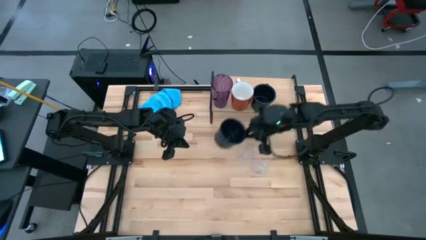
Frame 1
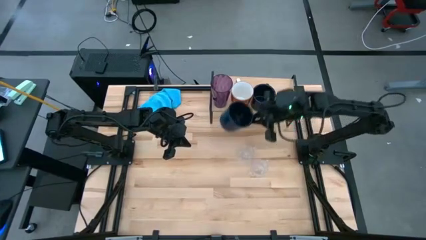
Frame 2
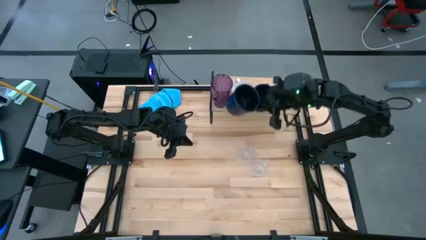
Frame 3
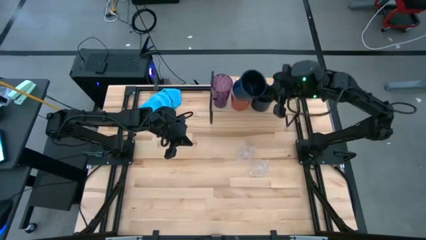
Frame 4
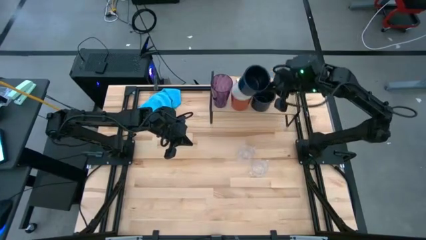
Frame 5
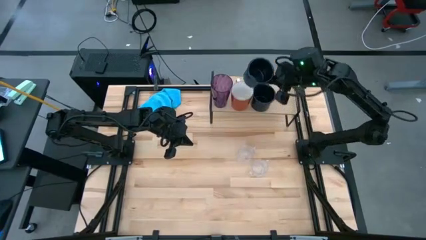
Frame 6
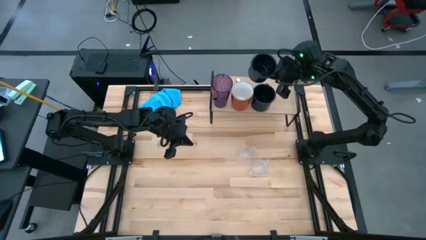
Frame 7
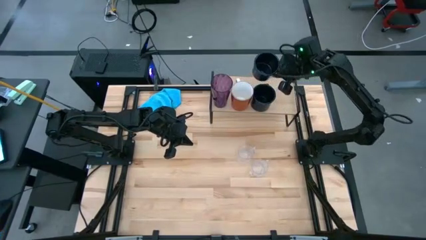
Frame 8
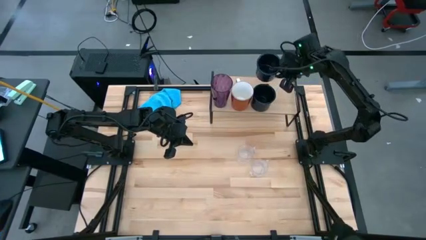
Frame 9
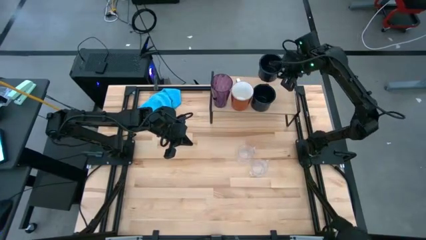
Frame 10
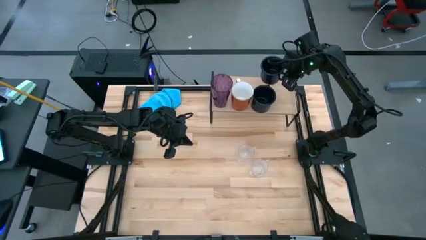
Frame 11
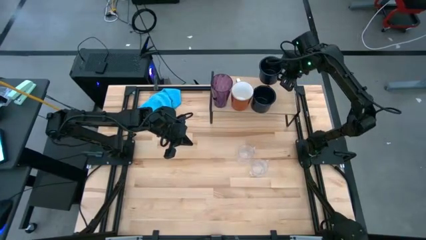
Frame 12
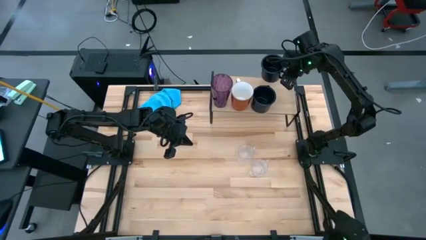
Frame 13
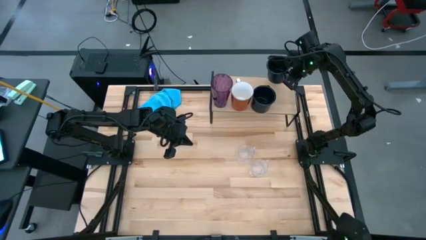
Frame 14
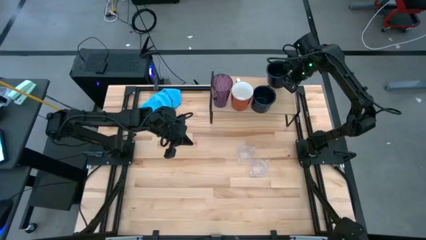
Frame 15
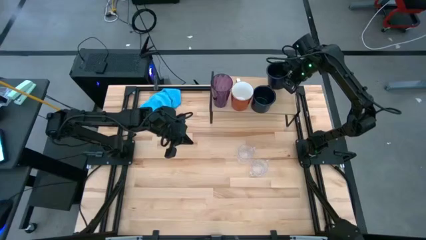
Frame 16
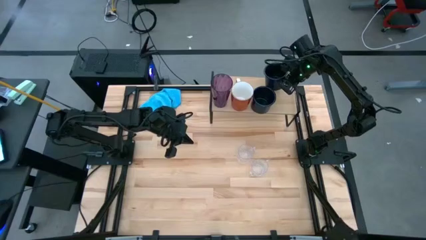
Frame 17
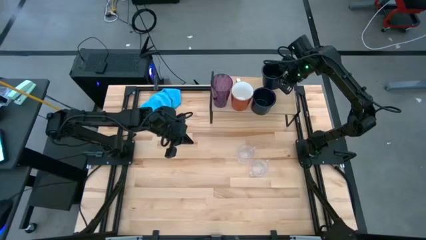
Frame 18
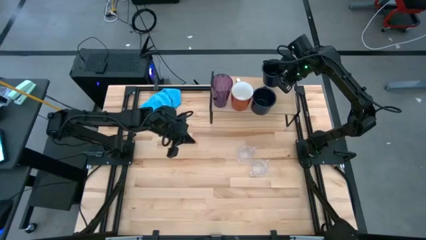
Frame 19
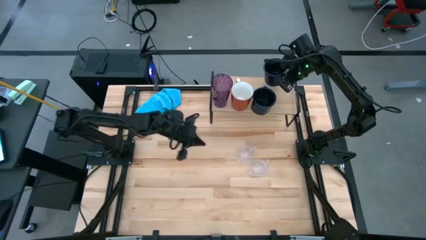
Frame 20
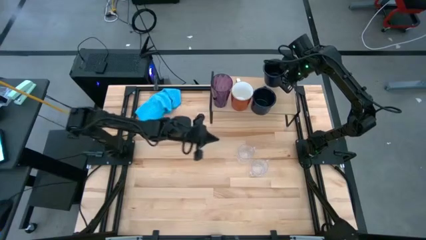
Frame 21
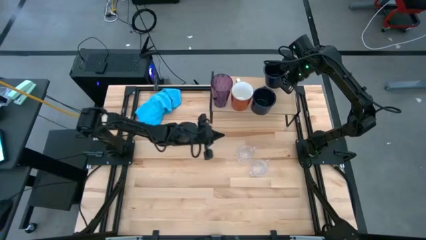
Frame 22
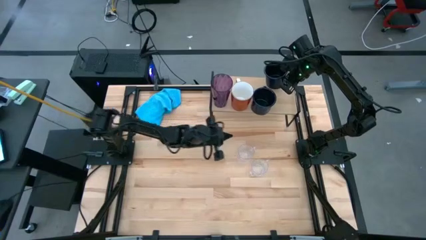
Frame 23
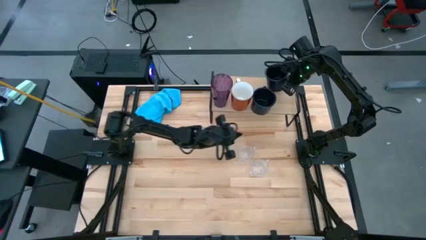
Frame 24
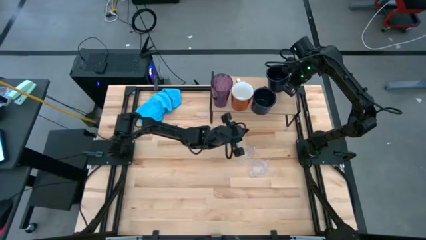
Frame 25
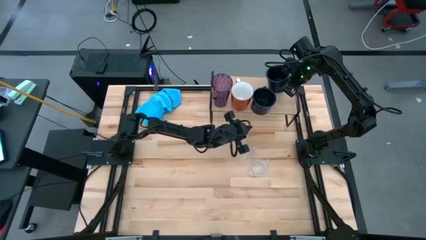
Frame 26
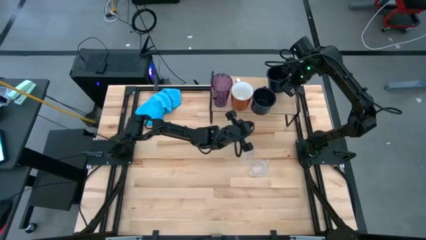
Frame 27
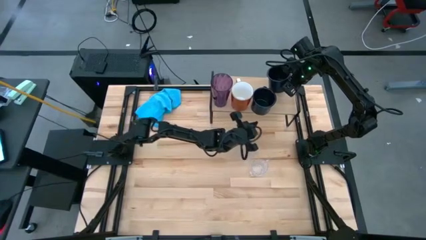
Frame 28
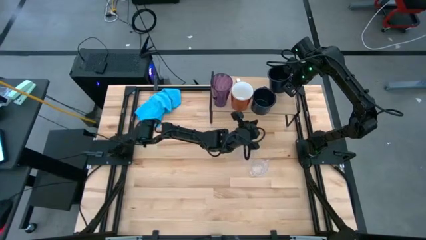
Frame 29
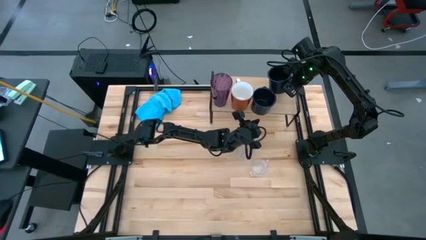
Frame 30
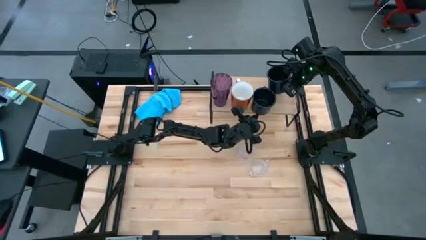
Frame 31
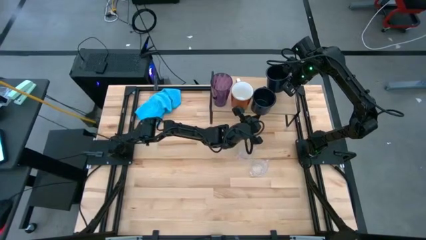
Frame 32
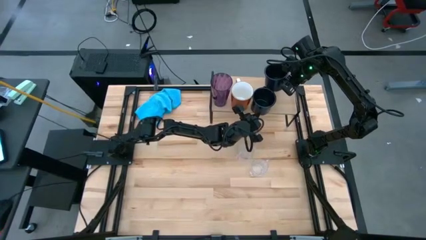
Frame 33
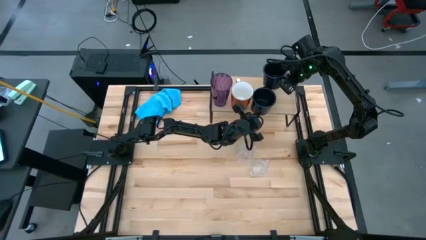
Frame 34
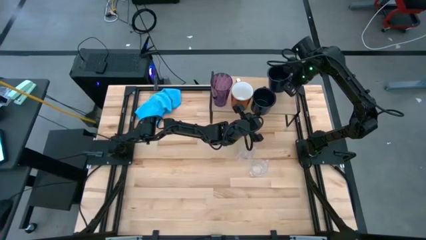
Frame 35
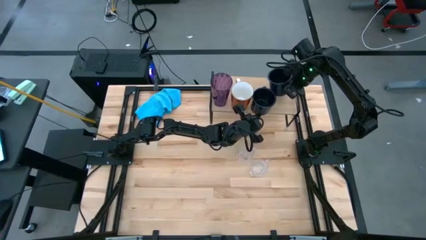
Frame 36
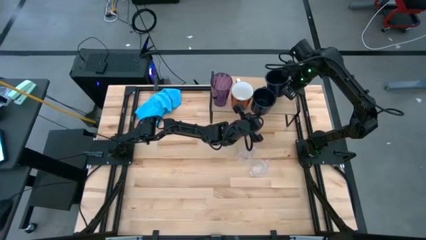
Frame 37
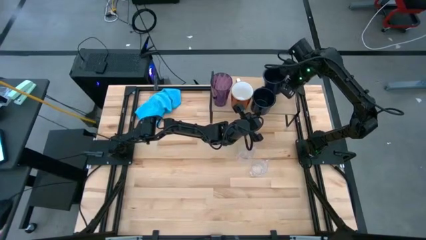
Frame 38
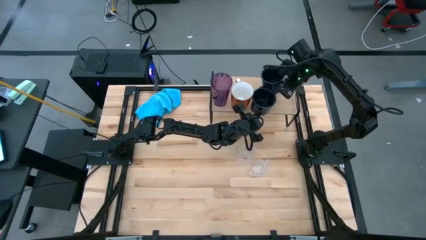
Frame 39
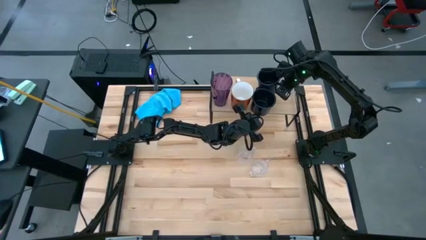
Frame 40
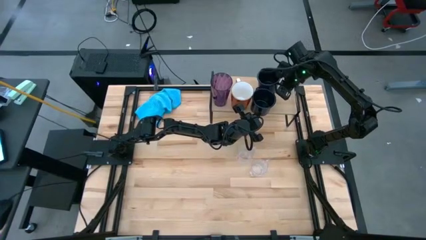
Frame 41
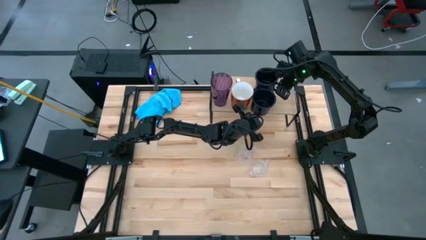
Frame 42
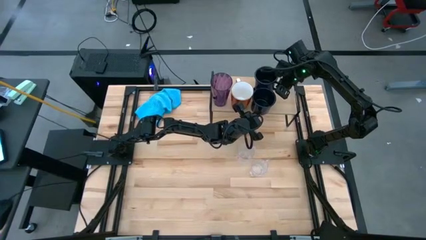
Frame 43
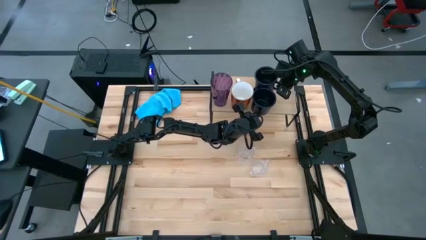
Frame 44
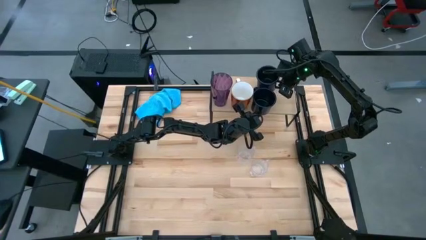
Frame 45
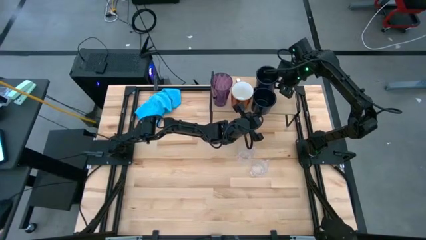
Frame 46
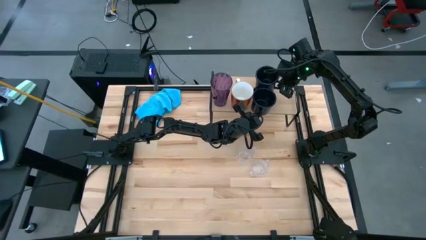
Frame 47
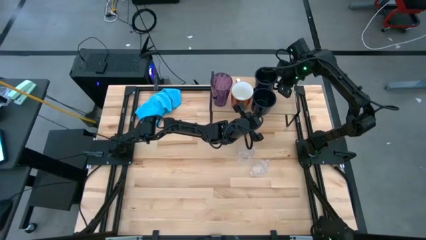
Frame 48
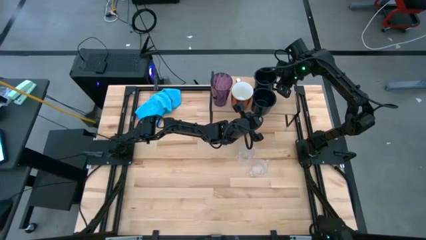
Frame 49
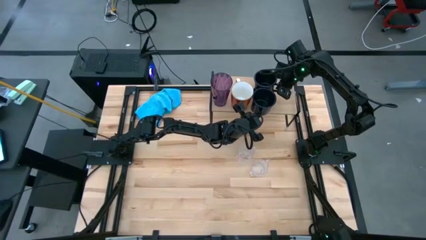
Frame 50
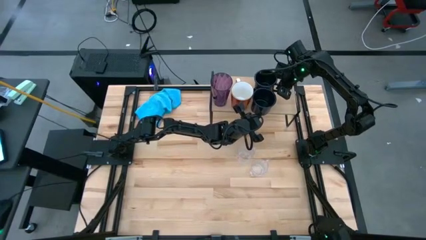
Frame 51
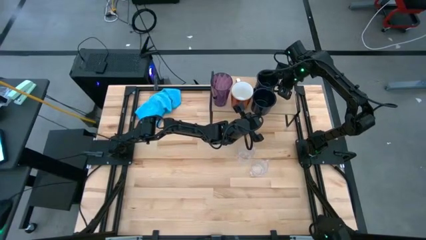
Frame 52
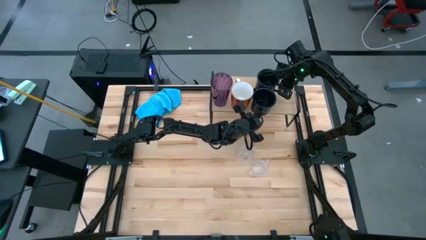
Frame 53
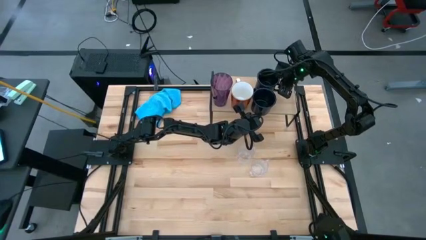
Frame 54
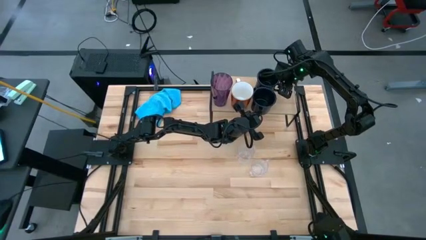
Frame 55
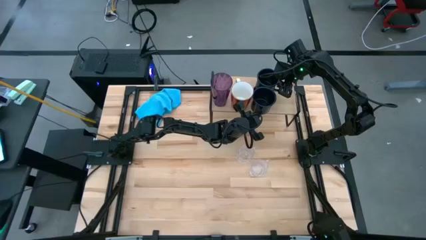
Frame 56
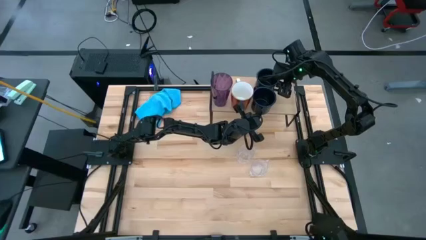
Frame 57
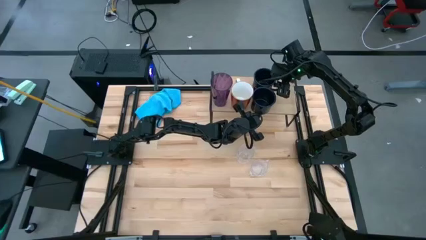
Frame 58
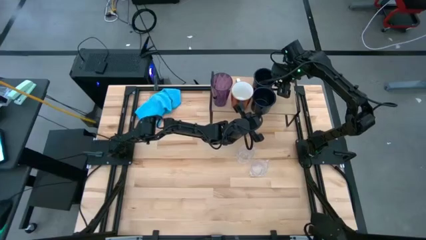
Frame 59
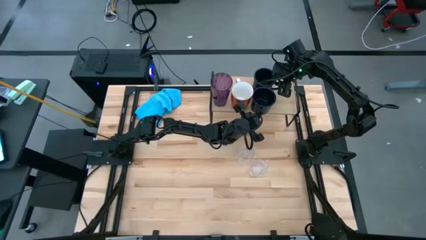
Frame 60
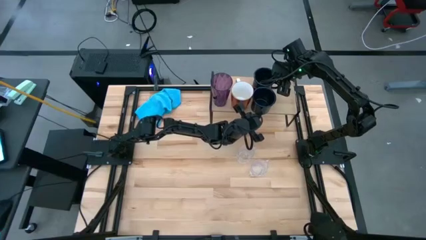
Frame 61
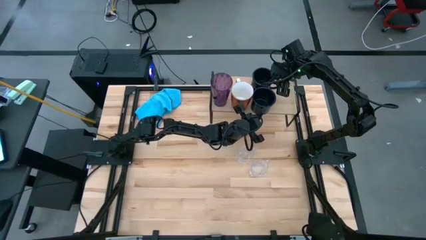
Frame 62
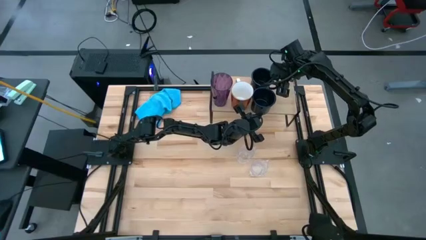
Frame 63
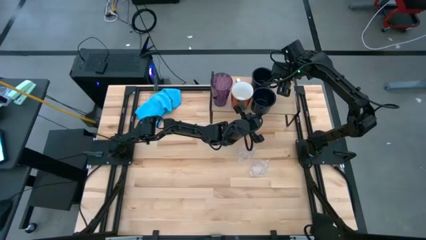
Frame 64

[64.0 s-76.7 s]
Task: Stack small to large cups/mugs on shelf
Put the dark blue mug on the shelf
